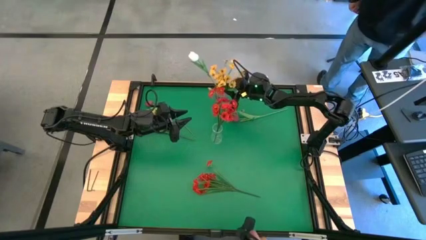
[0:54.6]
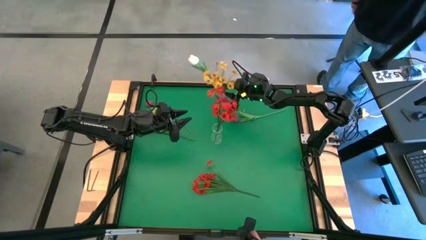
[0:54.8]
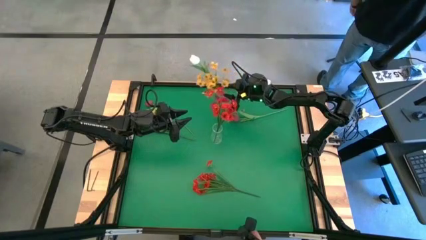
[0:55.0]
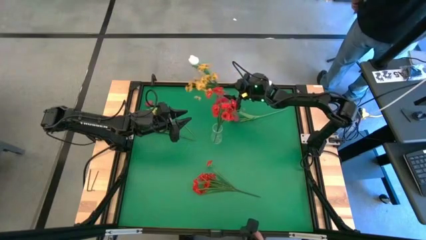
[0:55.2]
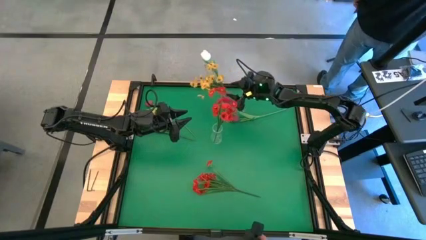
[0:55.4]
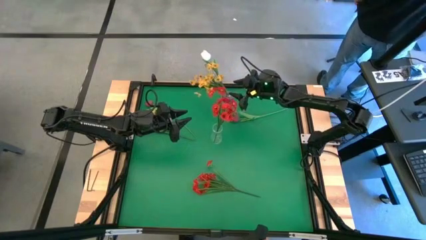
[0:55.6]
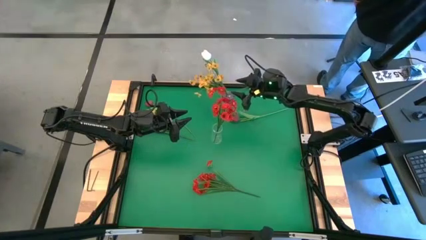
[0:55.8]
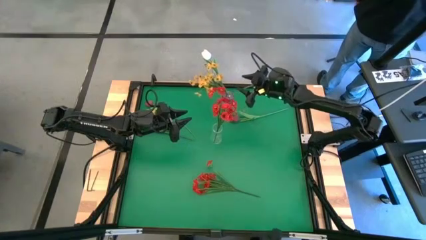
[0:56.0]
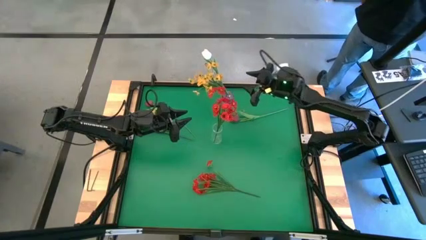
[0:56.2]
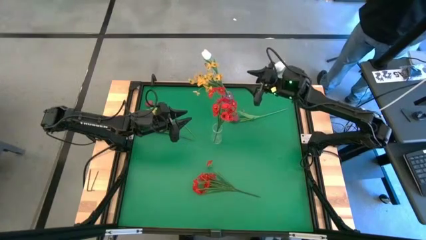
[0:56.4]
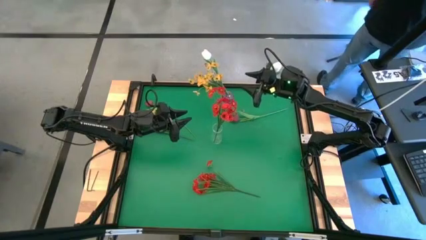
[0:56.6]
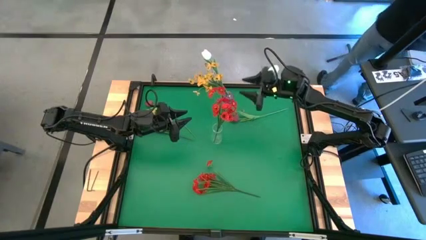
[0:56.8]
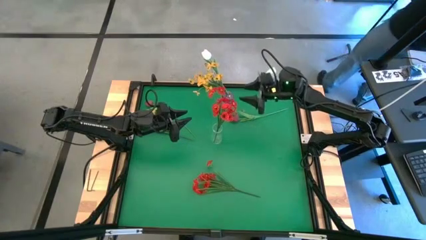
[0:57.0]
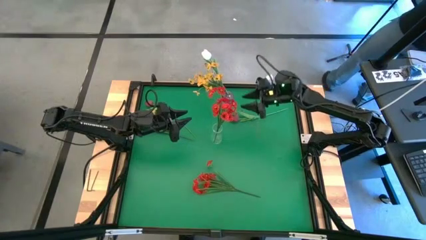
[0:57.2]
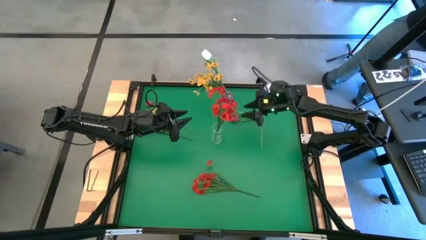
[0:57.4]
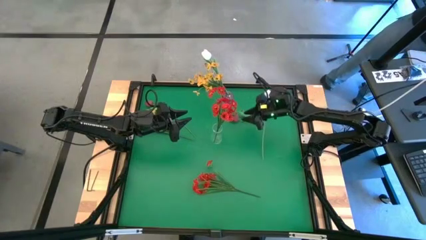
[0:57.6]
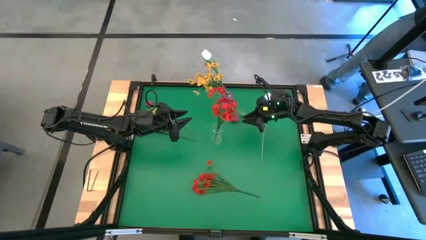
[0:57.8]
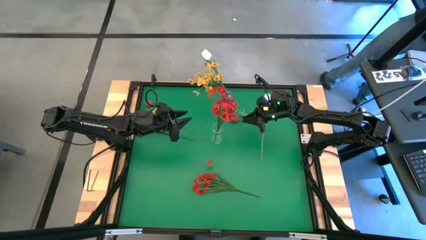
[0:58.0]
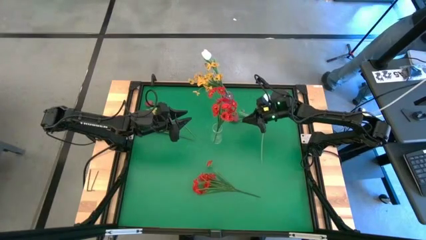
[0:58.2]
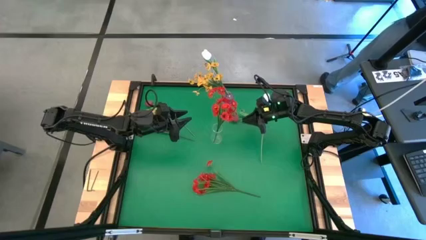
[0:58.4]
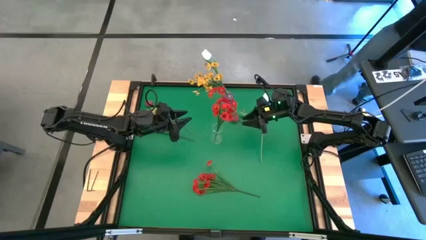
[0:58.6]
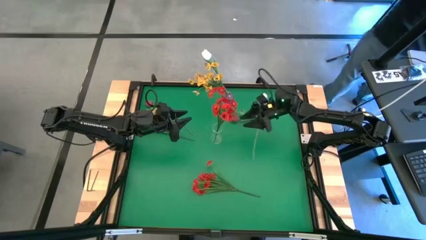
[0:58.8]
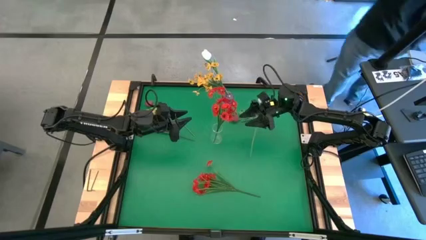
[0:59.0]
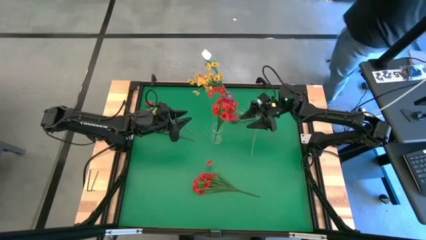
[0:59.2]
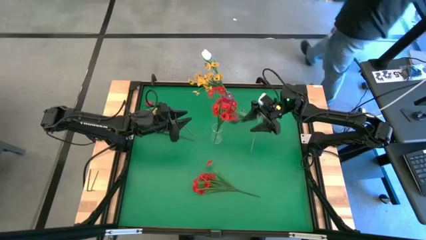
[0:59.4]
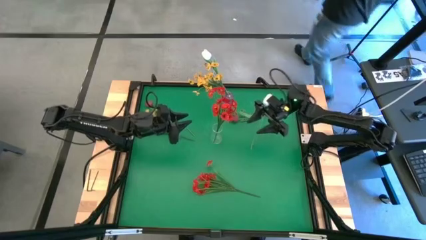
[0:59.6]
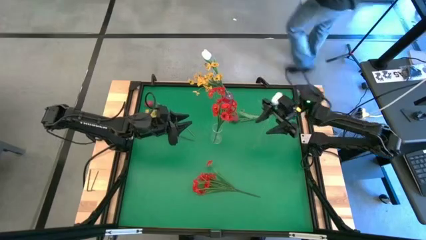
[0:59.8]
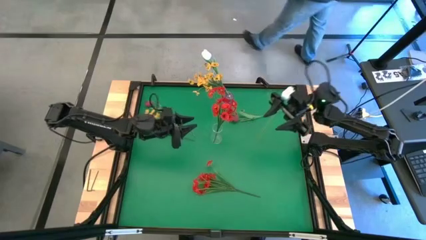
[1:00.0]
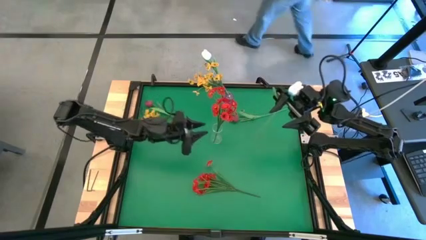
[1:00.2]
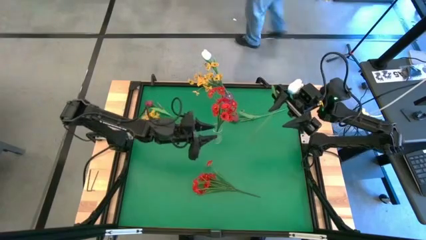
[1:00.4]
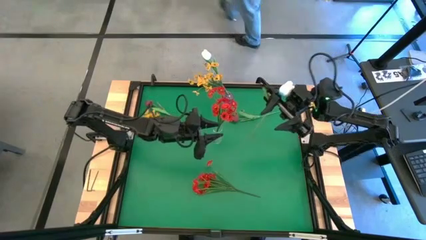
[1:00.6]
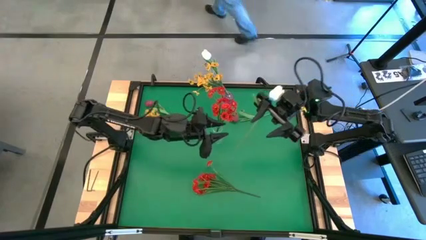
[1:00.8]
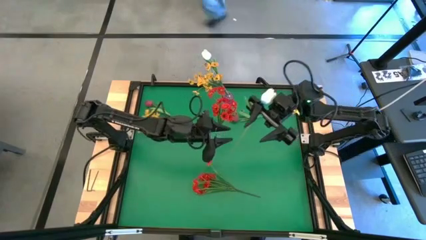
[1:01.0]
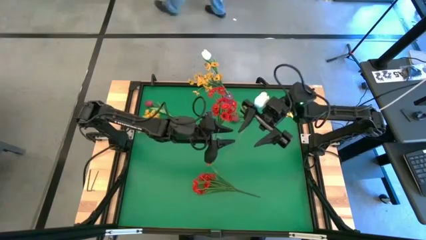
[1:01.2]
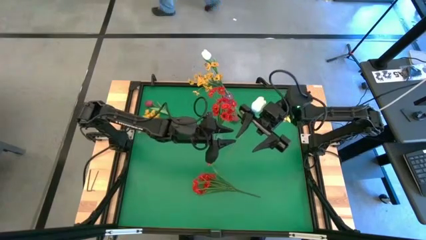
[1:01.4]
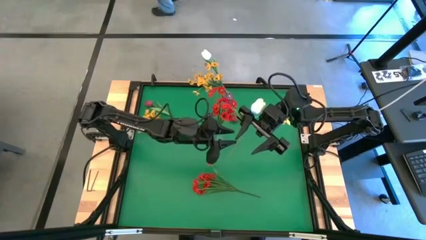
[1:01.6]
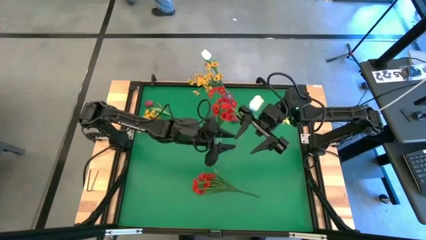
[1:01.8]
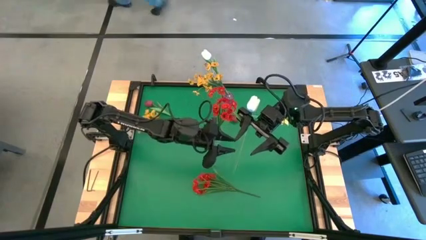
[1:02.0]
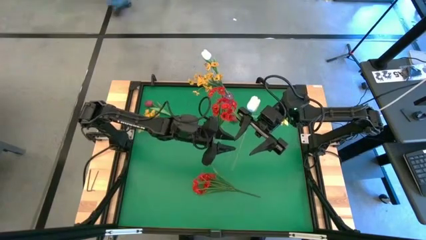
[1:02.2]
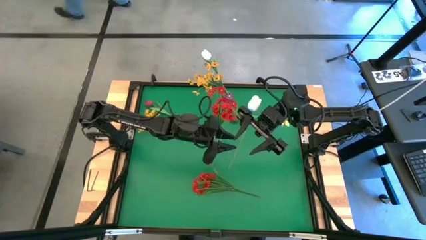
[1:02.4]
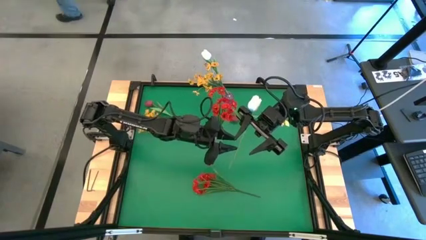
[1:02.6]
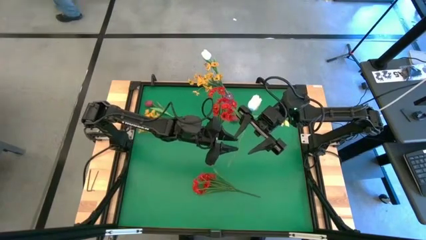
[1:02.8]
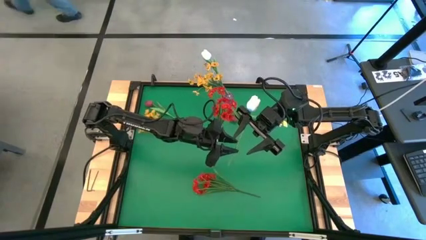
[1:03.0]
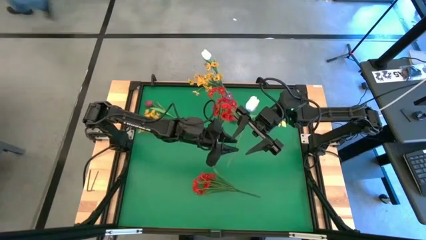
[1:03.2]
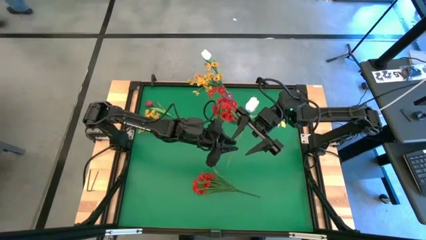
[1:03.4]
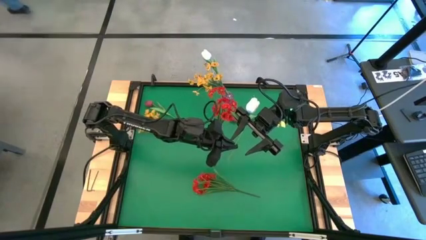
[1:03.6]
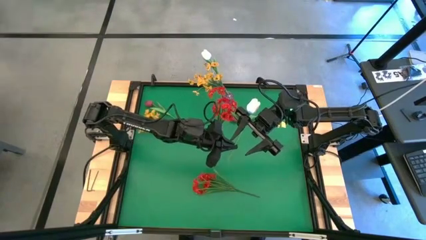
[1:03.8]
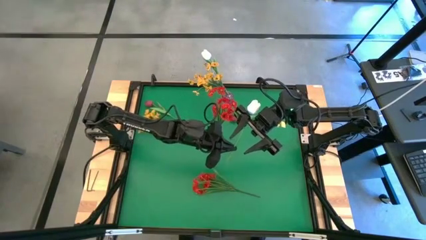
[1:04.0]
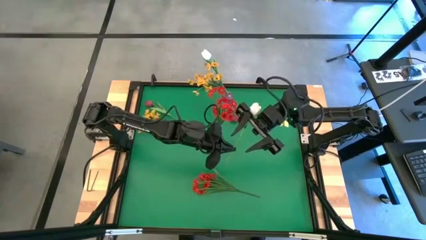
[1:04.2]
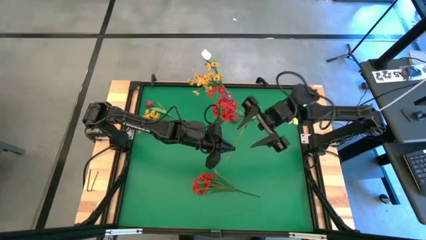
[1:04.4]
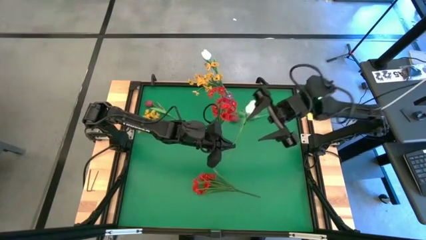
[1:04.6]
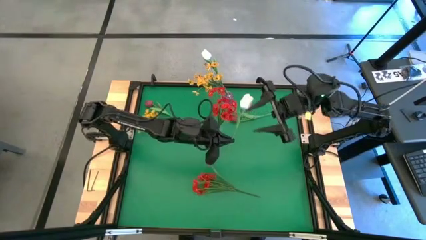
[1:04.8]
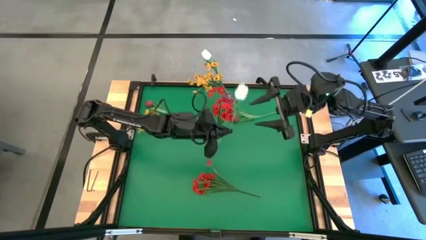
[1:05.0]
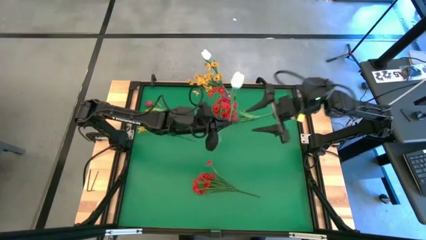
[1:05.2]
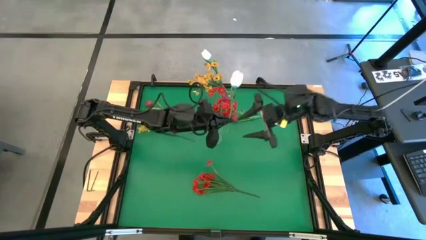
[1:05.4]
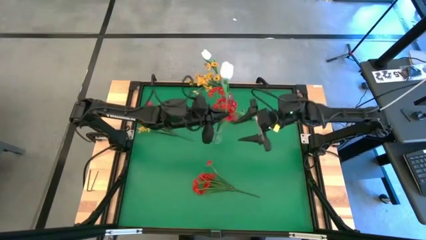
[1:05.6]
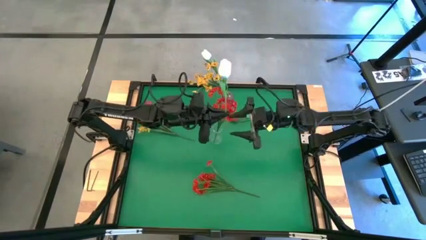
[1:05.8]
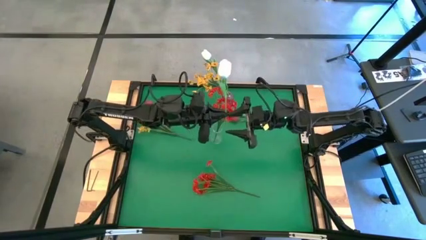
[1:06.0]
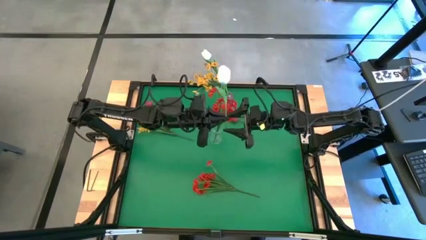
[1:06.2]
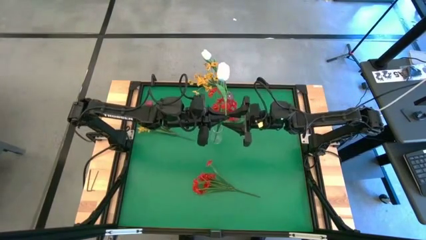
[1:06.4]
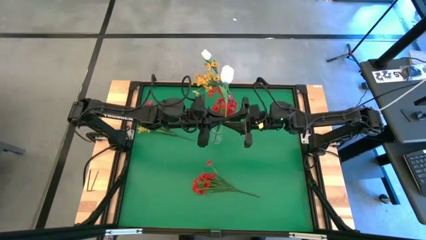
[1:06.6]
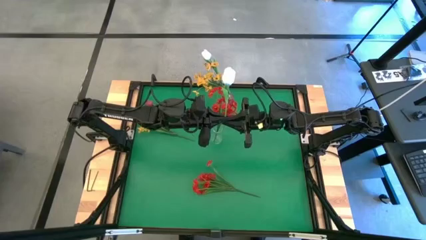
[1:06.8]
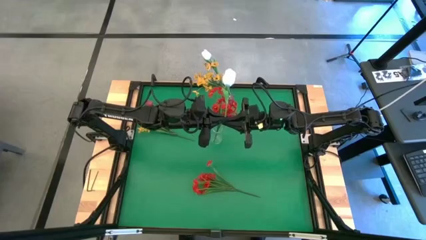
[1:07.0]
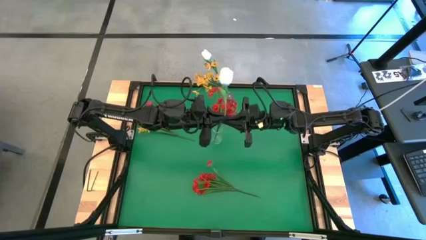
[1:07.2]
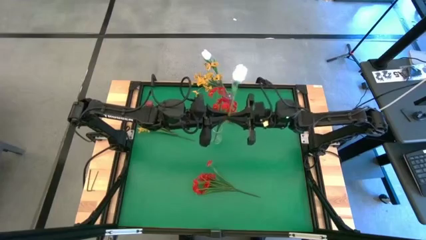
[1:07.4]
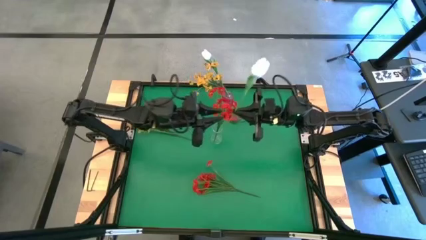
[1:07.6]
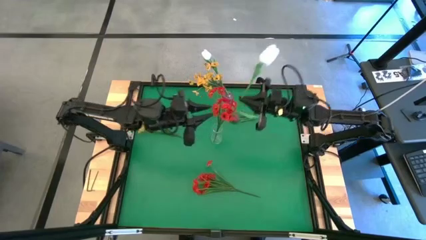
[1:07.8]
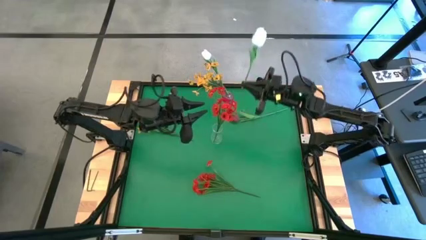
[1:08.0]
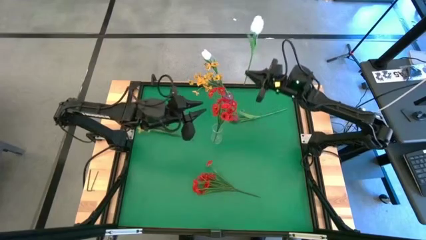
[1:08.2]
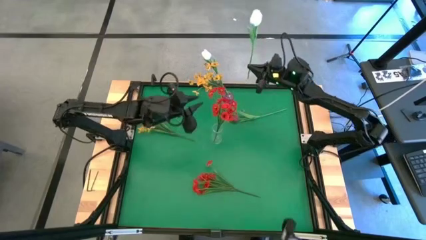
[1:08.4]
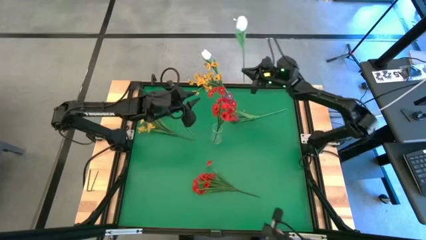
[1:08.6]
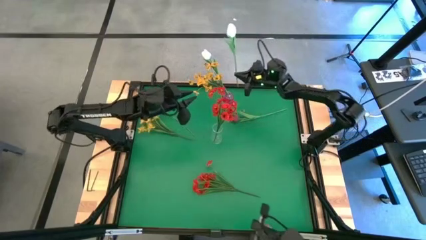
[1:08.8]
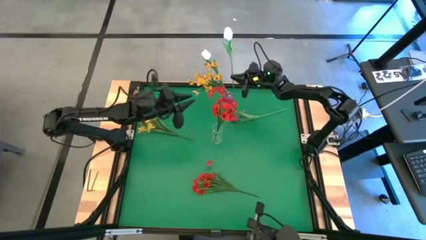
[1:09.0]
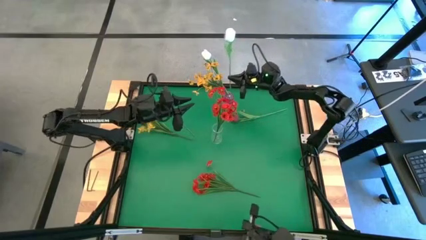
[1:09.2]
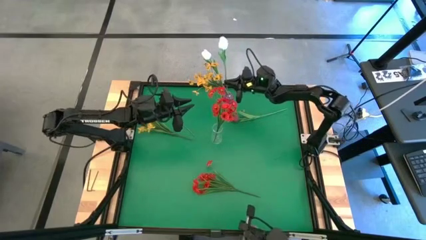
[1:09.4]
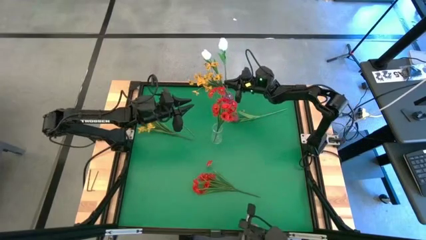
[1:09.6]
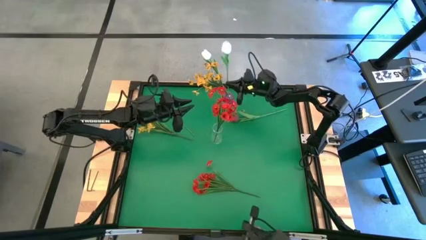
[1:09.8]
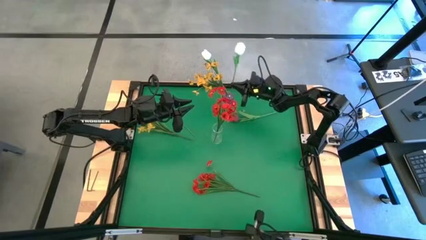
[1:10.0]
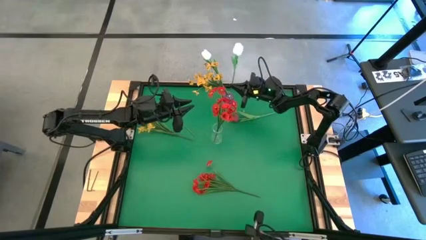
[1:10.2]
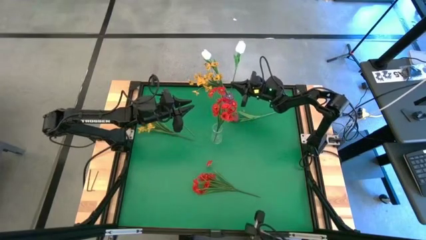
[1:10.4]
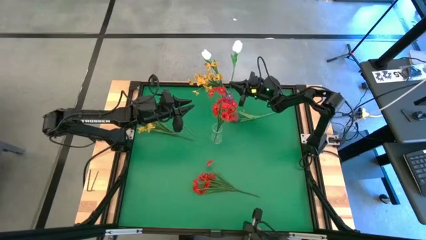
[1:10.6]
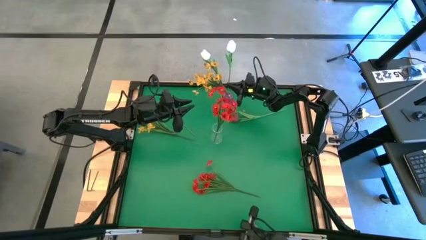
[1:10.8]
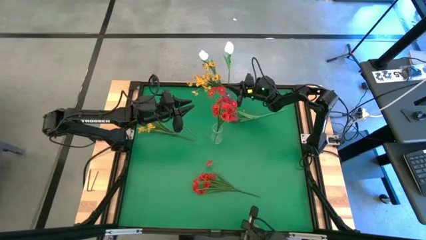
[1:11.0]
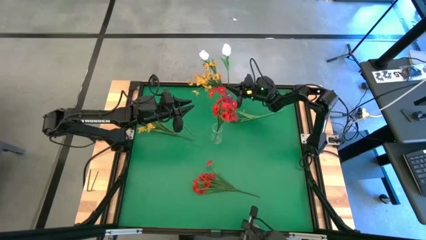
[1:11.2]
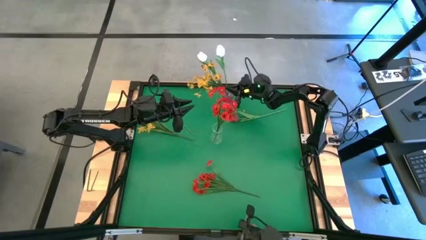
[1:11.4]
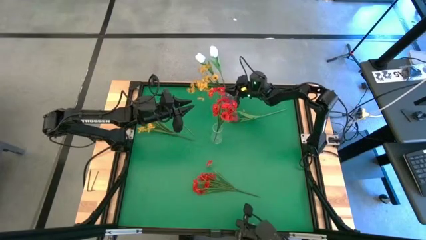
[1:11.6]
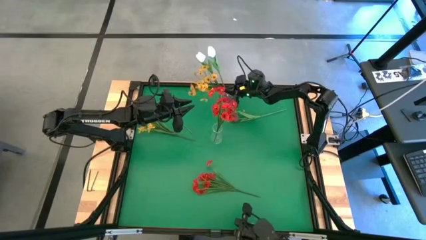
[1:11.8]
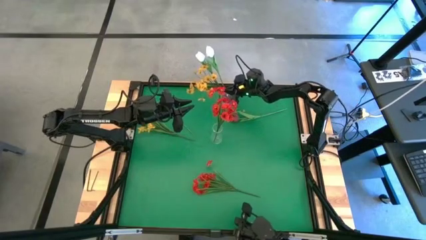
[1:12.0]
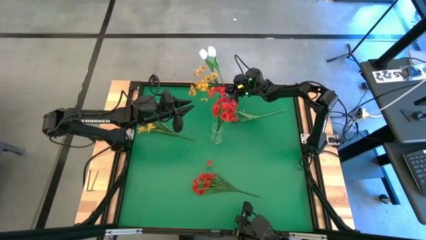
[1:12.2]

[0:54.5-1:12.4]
Task: Sort flowers into vase by color
Put the white flower into the purple vase
